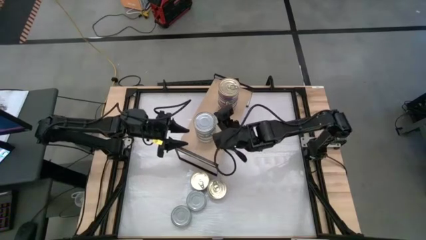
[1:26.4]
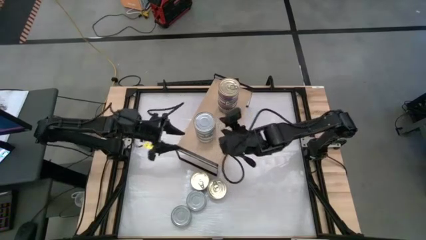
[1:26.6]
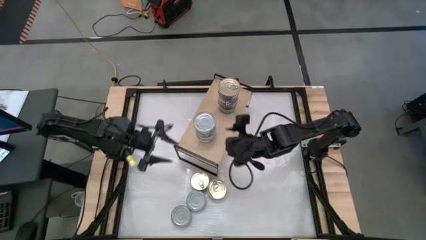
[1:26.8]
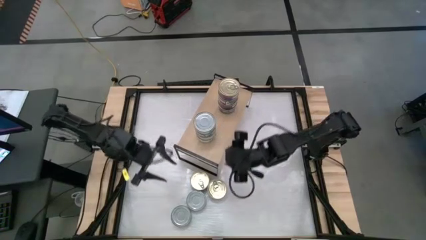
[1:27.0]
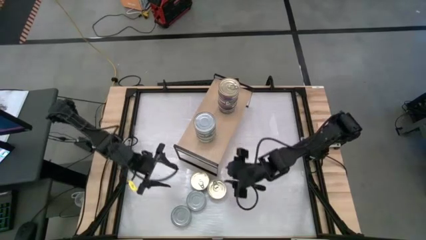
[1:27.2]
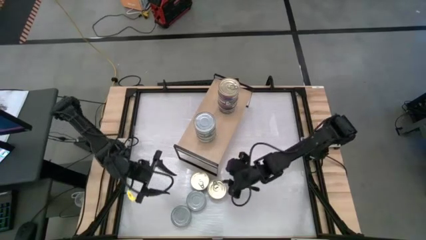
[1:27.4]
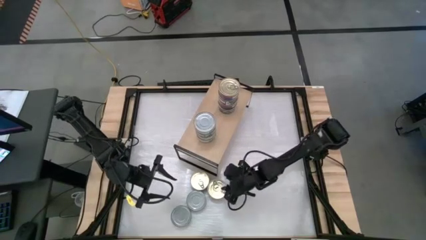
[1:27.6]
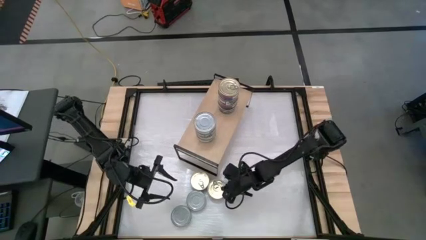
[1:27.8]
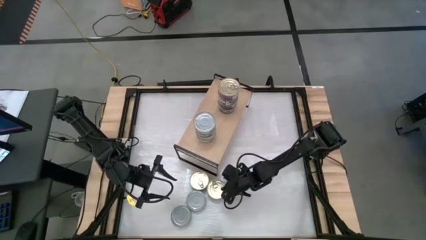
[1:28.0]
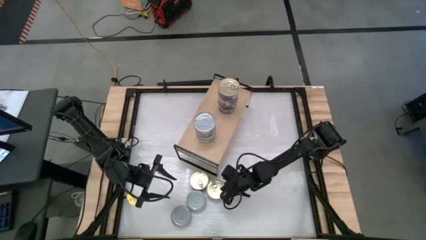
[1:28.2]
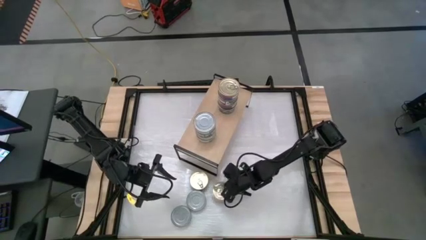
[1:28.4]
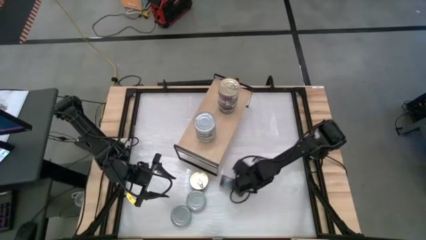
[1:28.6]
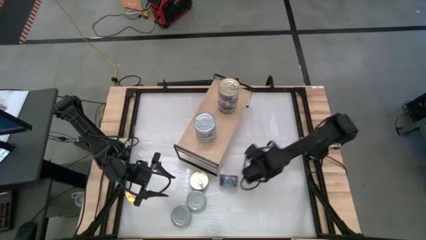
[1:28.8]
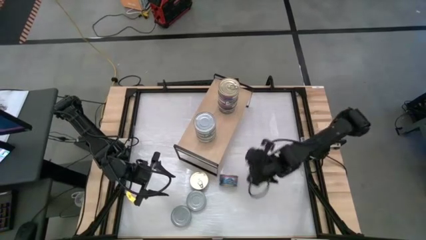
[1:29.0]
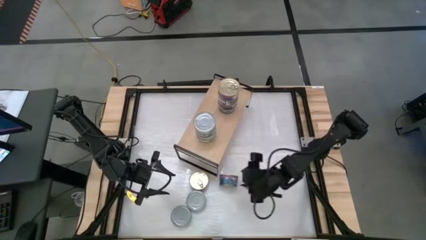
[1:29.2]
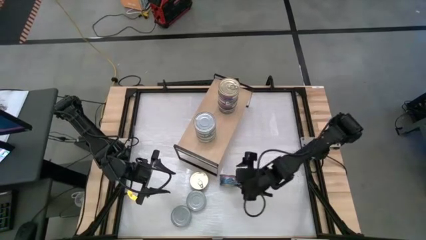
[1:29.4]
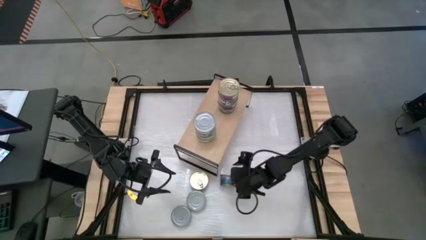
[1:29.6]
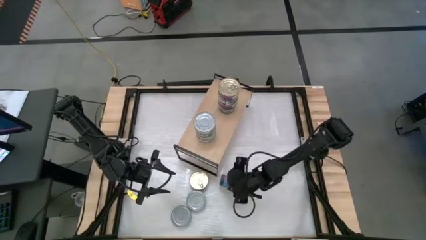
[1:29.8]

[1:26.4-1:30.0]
Task: Stack canned seafood by type on shelf
Stack the blue tuna can on top of the stacked blue tuna cans on the shelf

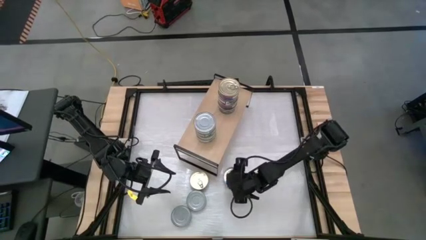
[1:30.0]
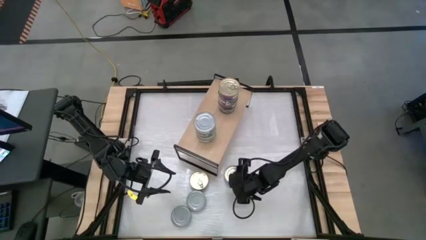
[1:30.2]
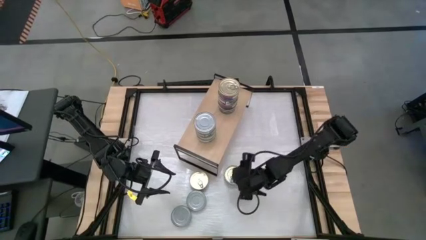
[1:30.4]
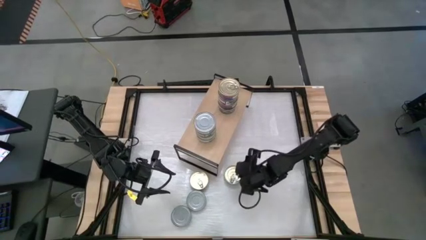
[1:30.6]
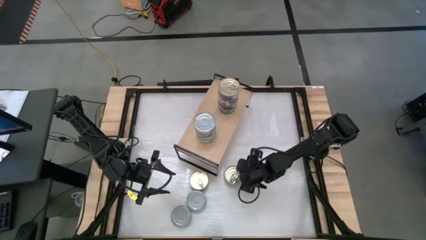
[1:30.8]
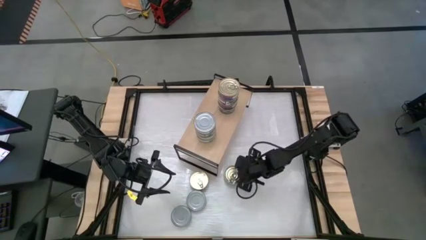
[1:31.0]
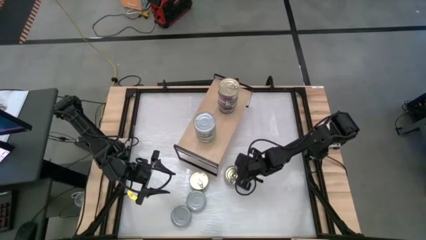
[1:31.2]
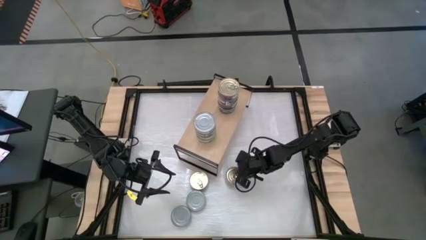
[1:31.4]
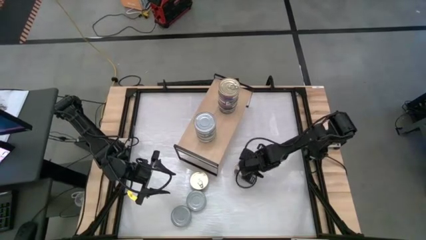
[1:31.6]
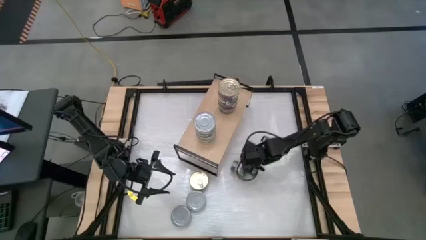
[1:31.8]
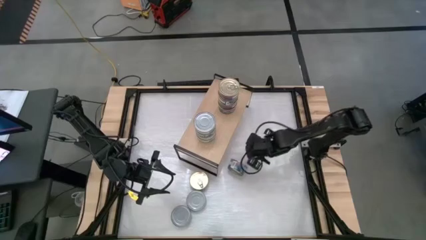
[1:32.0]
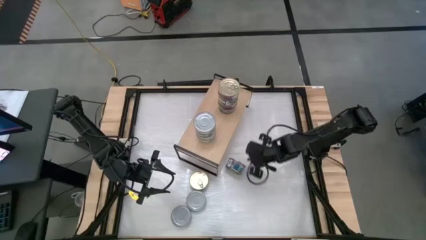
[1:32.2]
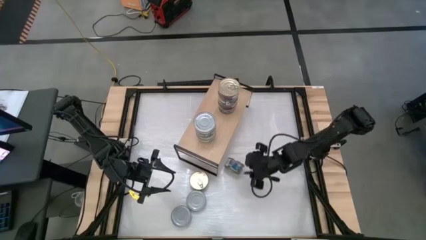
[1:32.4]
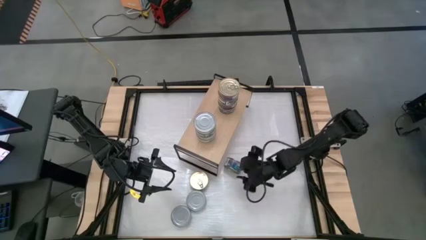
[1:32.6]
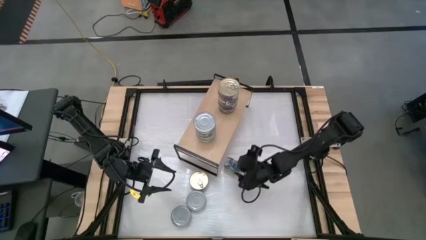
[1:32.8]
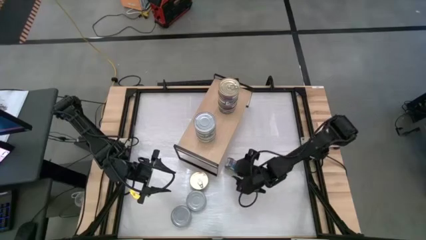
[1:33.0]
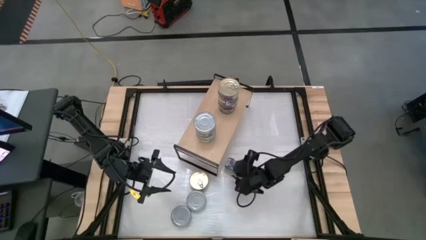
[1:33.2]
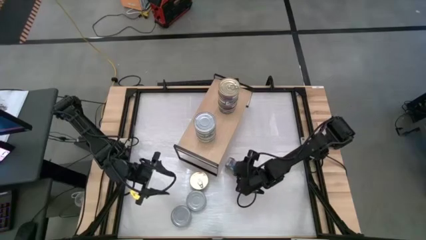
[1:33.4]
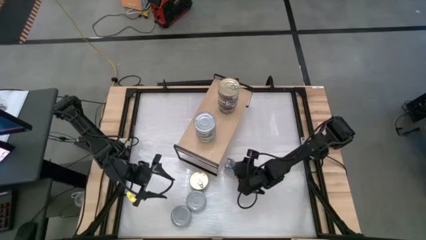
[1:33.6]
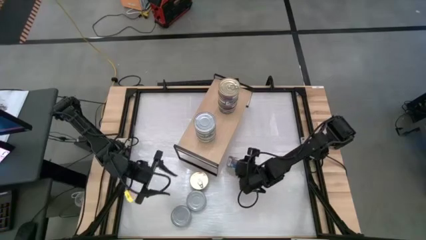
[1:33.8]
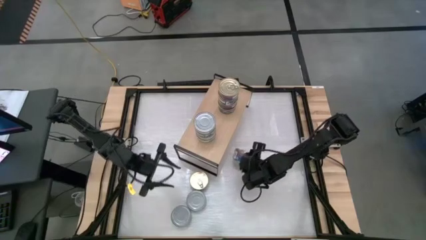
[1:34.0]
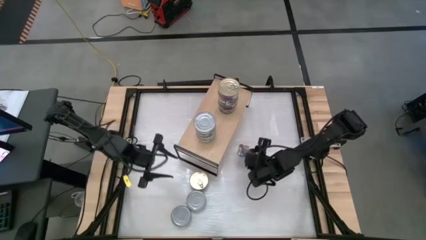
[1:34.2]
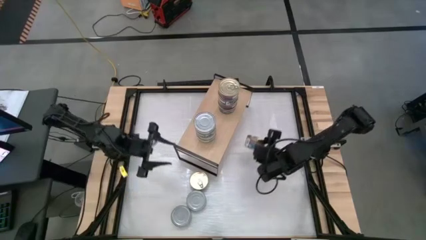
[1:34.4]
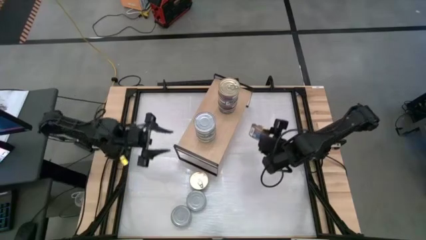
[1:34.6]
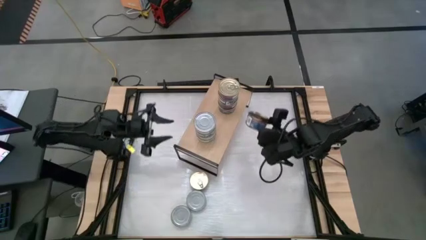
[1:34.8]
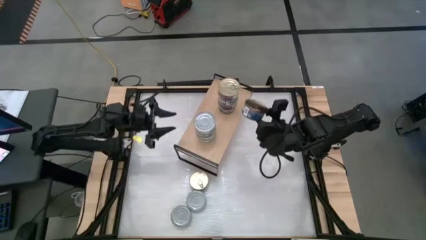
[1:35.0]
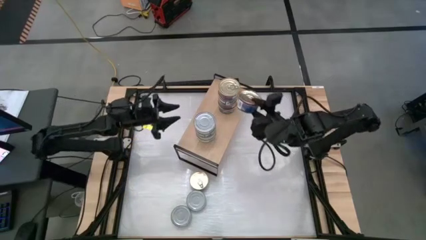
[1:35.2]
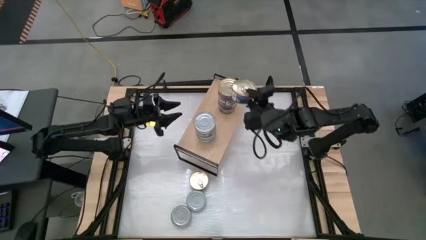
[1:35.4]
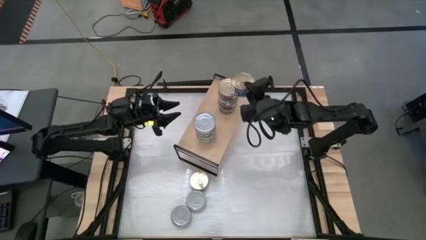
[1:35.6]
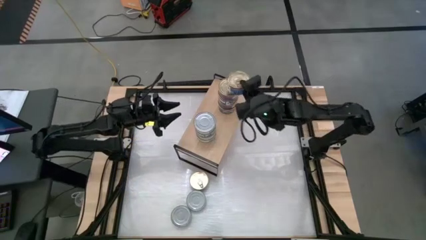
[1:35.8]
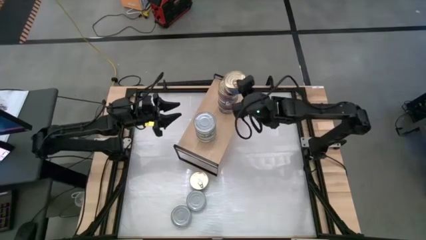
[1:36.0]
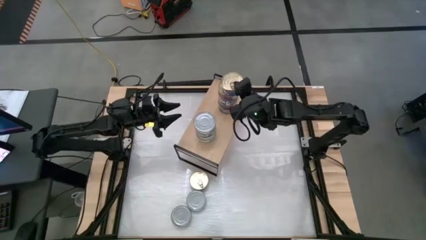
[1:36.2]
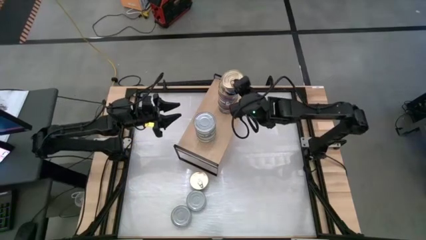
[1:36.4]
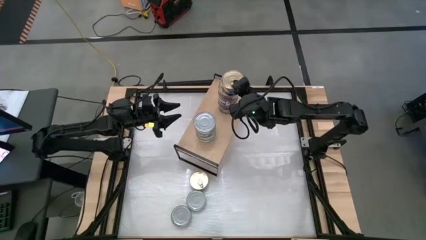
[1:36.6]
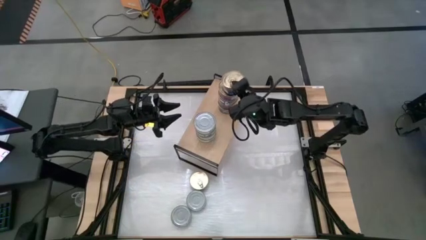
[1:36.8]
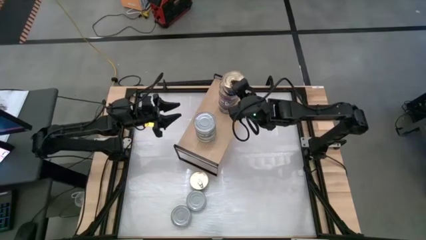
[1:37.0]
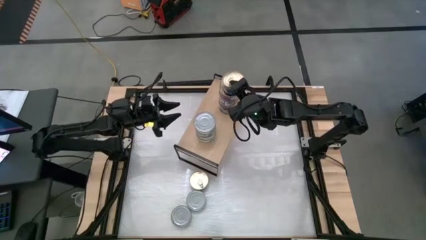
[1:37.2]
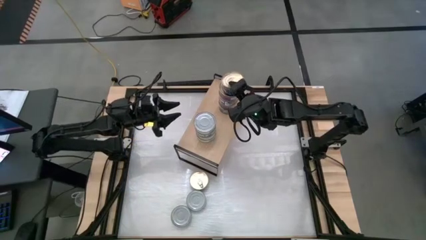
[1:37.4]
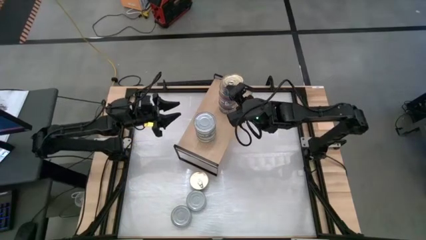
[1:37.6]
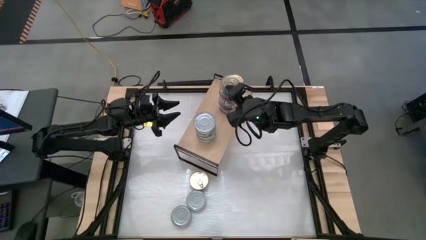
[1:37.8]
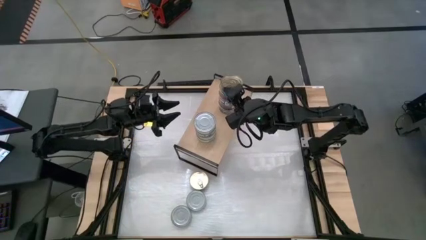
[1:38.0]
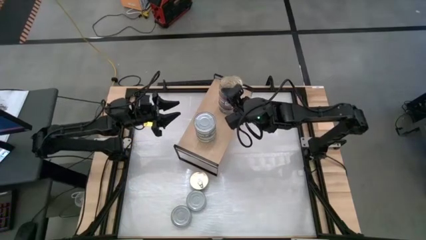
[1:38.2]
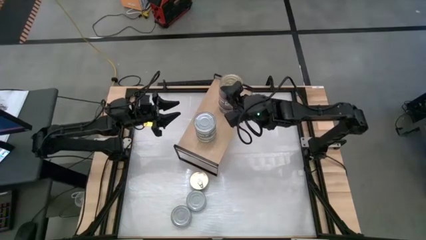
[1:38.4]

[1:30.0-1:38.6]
Stack the blue tuna can on top of the stacked blue tuna cans on the shelf
